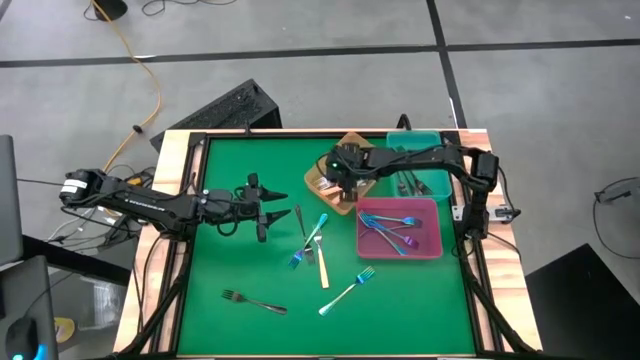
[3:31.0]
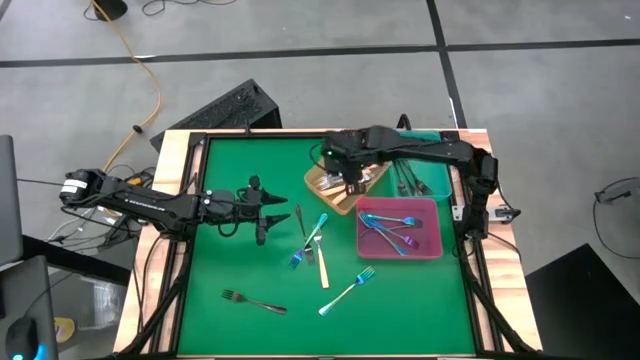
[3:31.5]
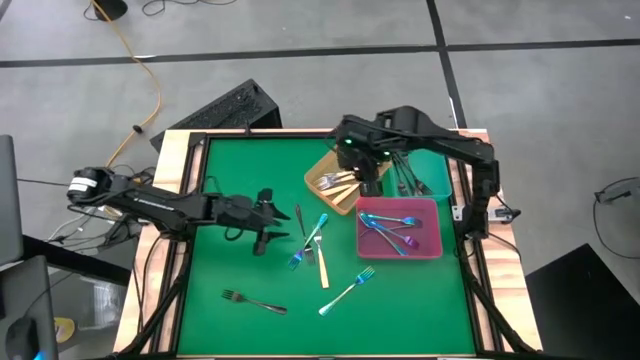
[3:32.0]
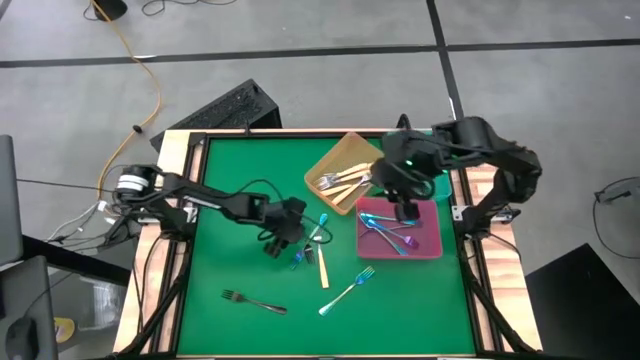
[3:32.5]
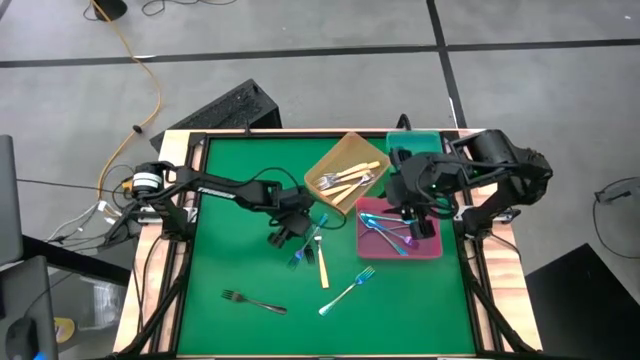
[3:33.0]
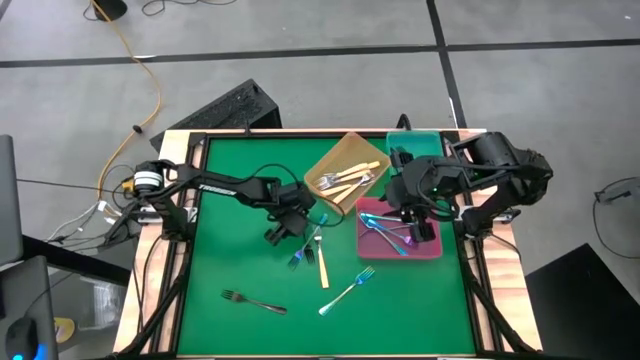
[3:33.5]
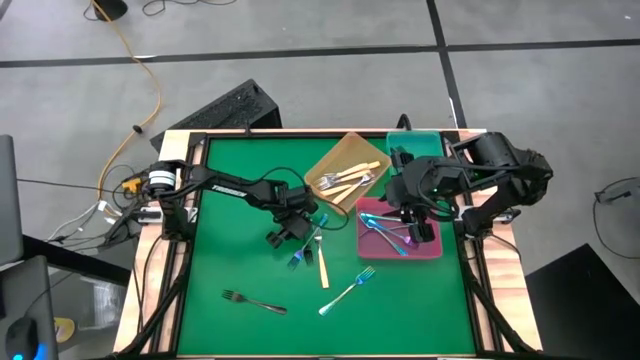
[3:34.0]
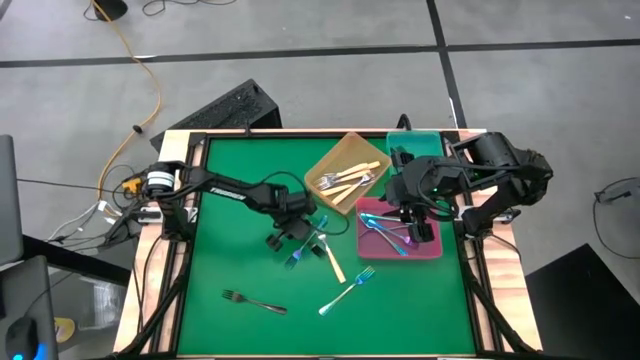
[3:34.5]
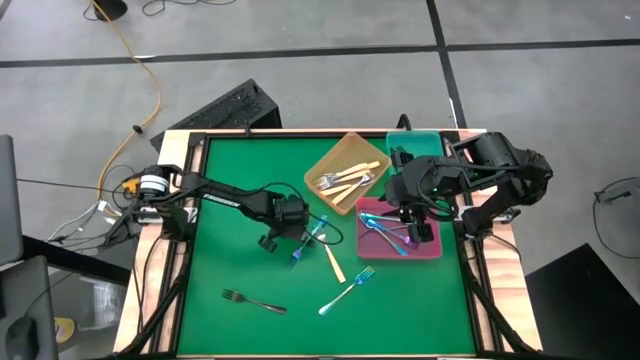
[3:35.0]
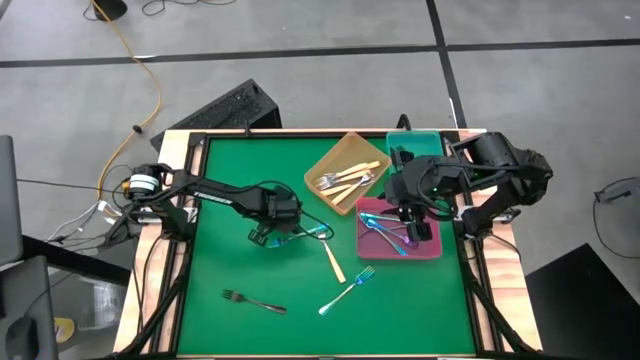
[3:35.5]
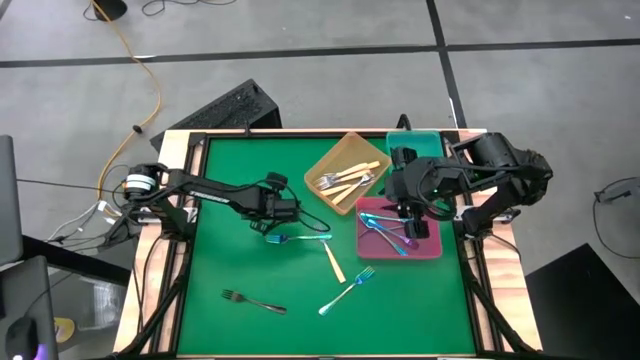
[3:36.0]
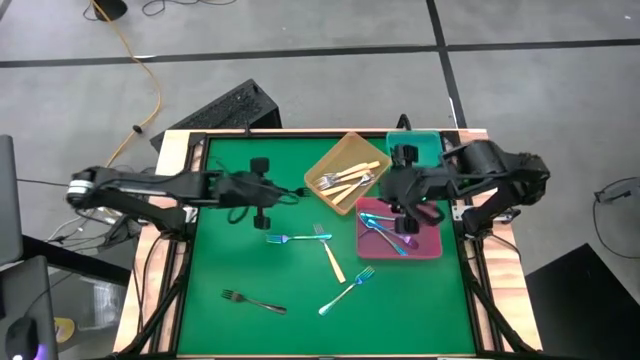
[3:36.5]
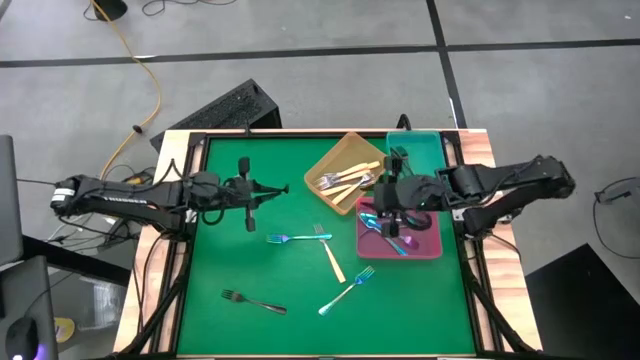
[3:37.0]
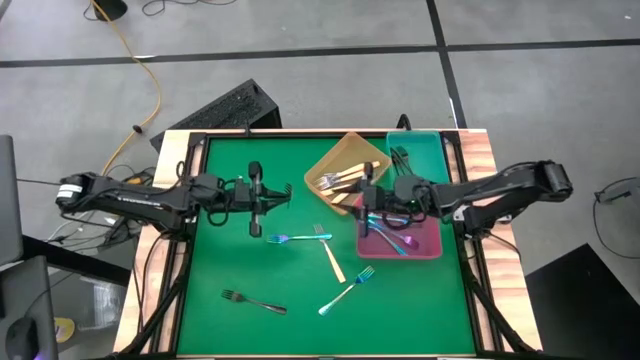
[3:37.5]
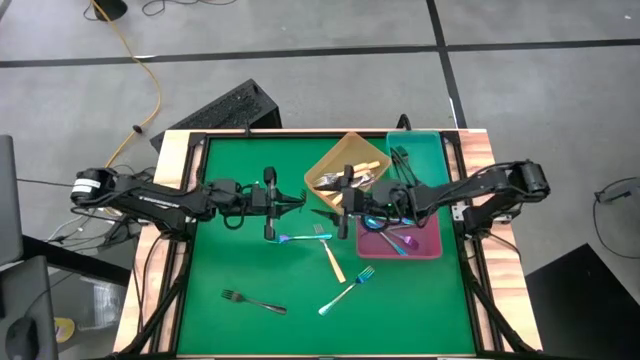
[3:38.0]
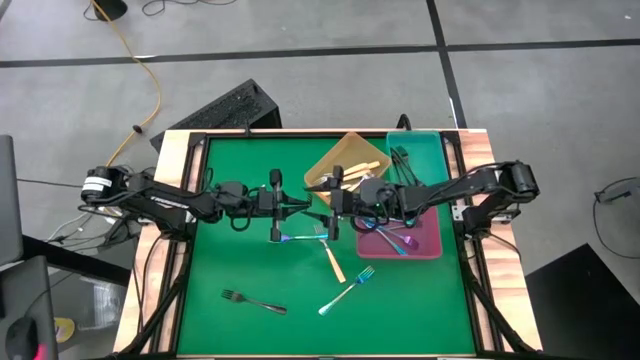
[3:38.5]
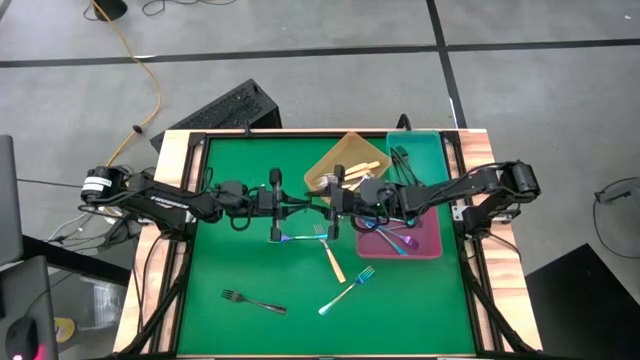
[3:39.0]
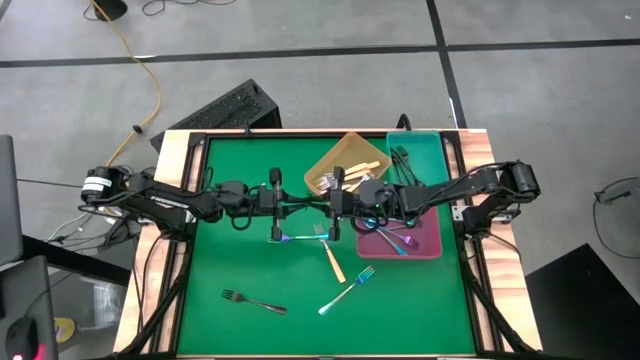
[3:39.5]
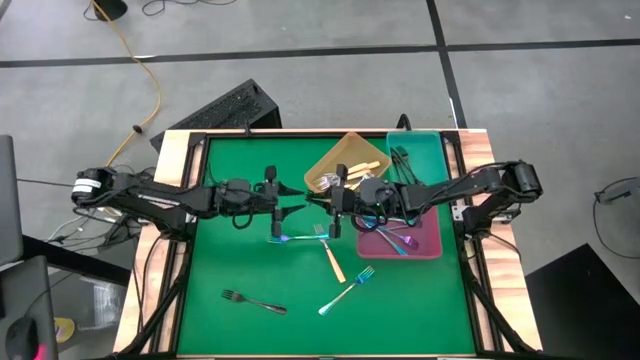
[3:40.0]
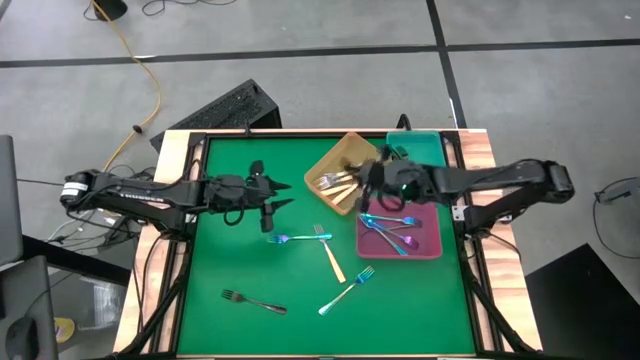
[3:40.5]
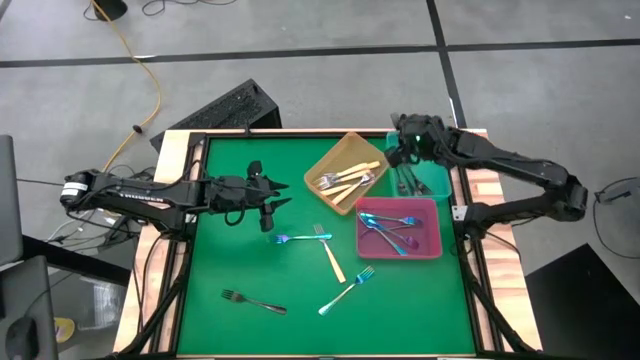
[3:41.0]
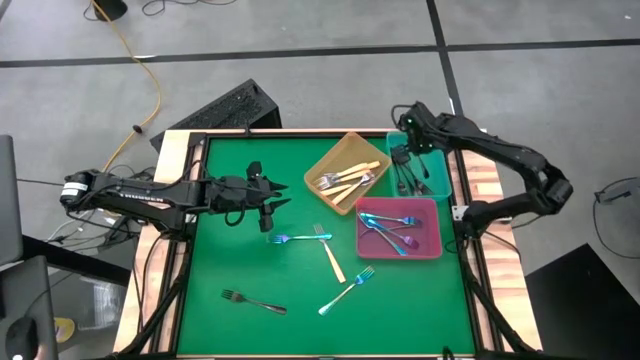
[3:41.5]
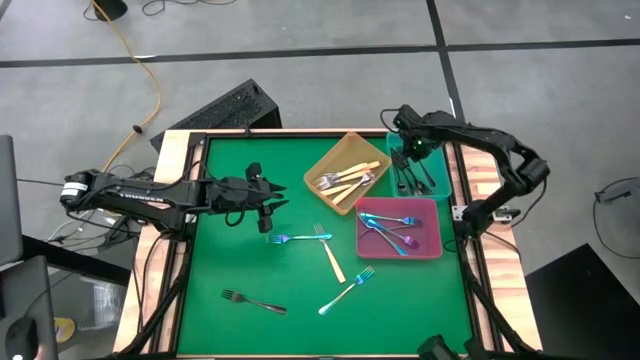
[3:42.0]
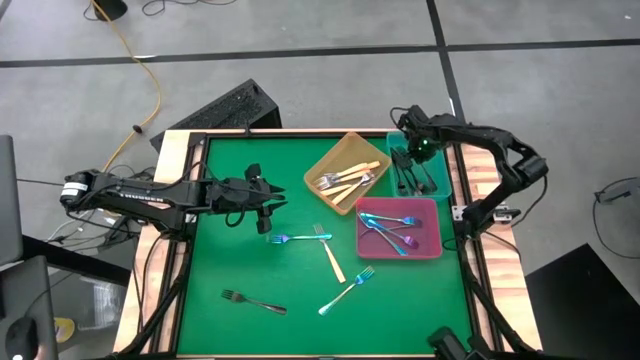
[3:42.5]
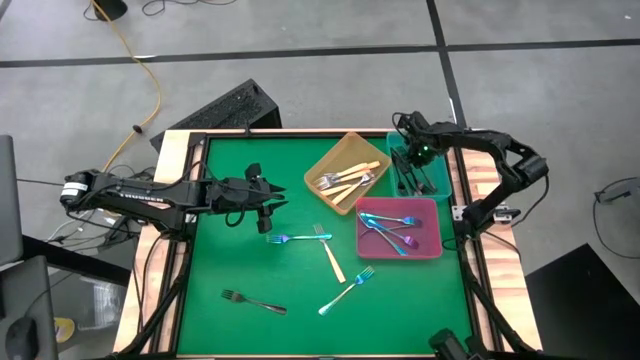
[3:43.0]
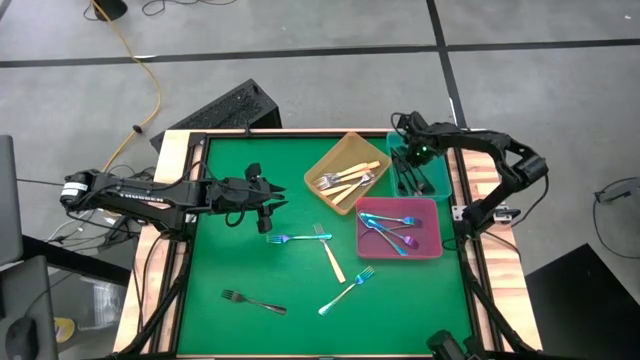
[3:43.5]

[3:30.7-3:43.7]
Task: Sort silverware by color (type)
Put the black fork into the blue bin

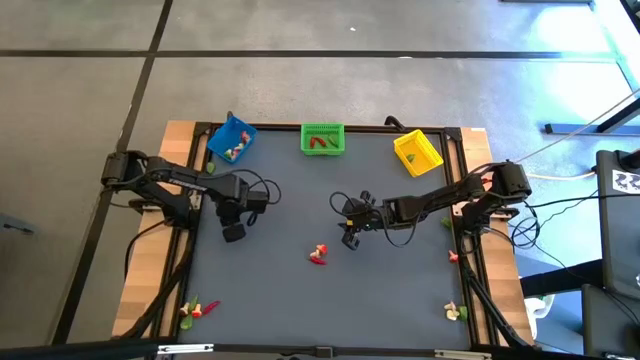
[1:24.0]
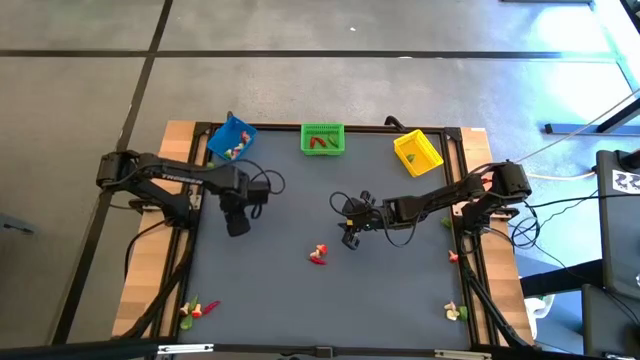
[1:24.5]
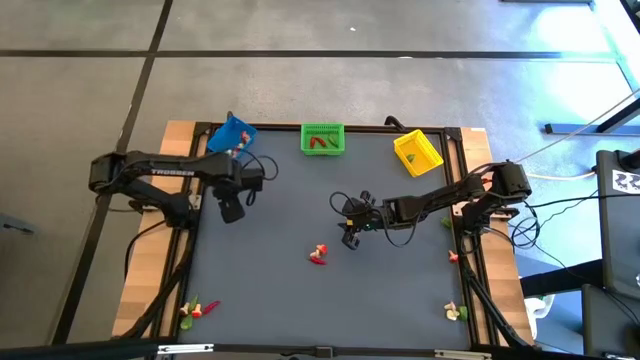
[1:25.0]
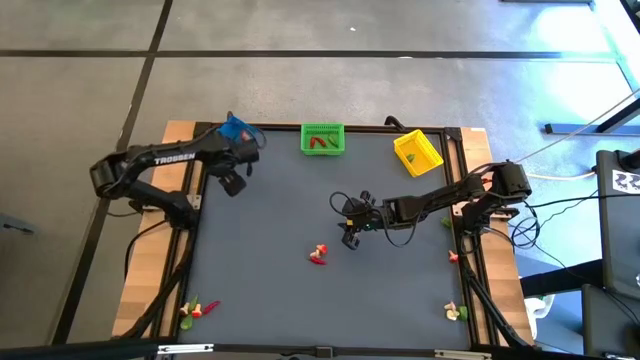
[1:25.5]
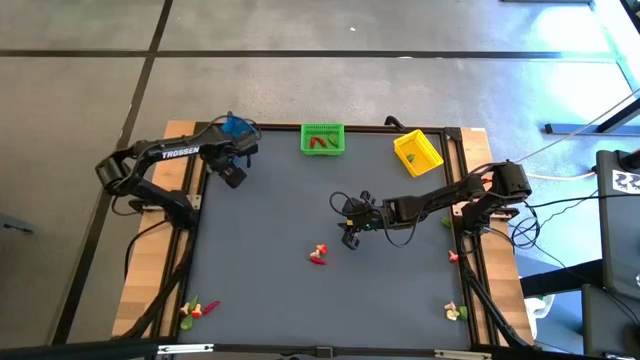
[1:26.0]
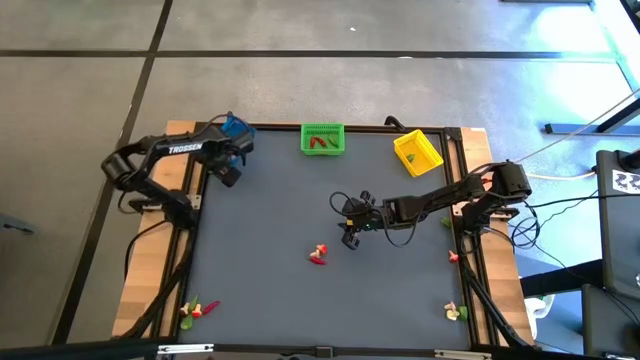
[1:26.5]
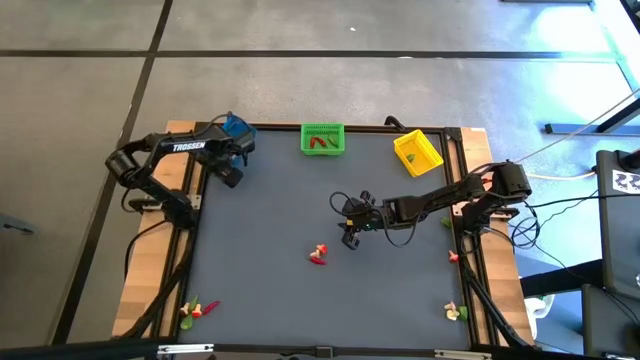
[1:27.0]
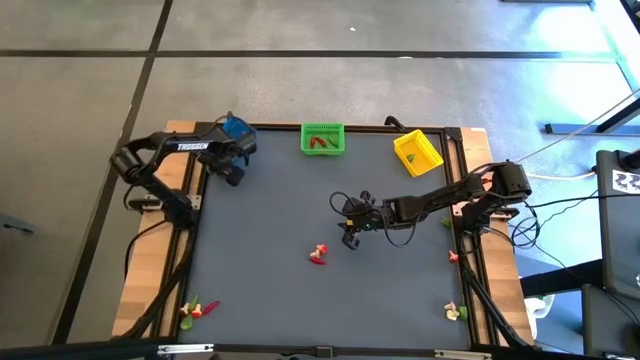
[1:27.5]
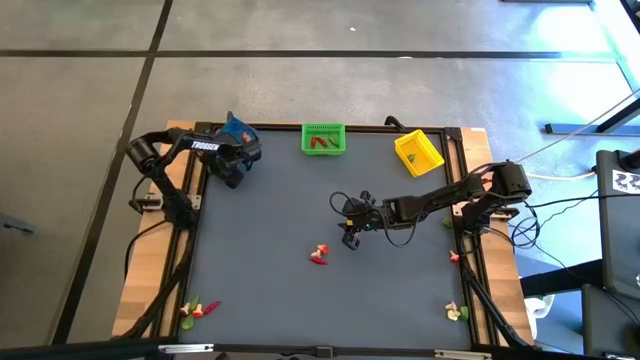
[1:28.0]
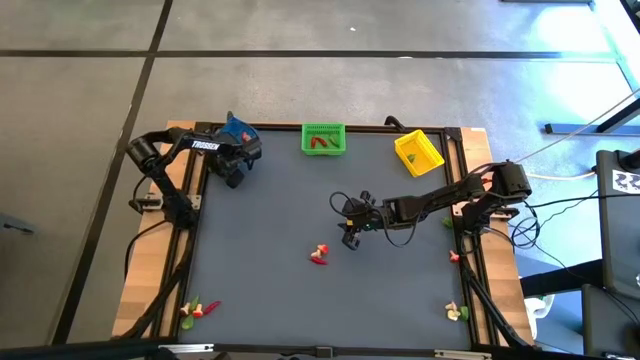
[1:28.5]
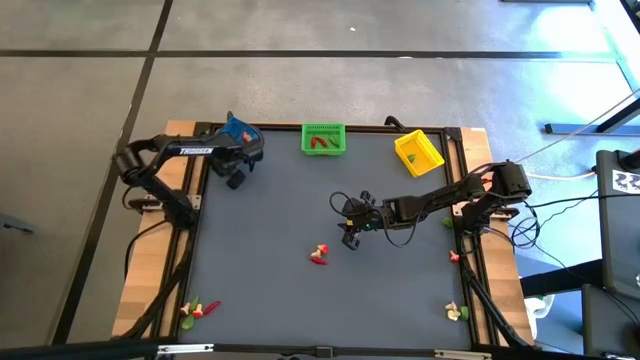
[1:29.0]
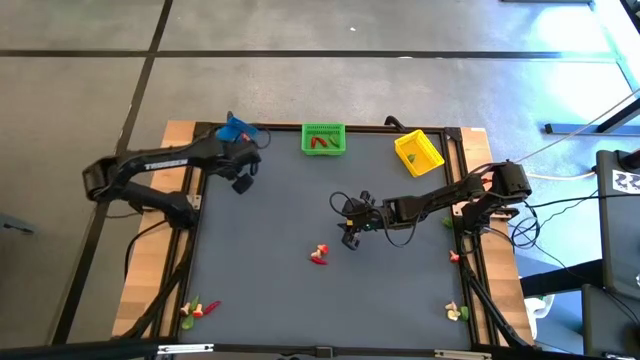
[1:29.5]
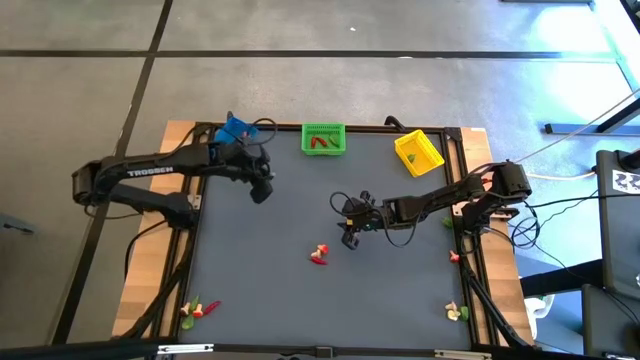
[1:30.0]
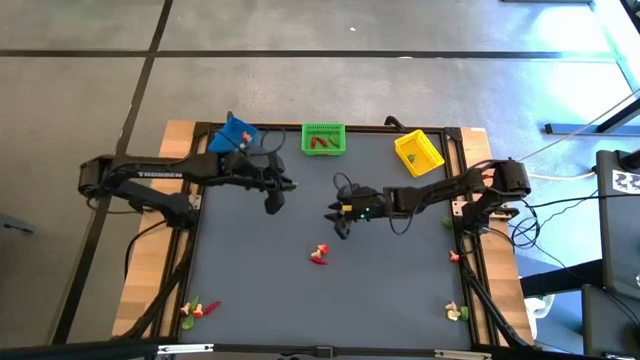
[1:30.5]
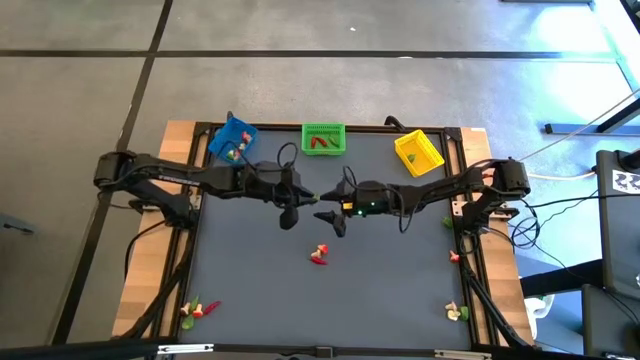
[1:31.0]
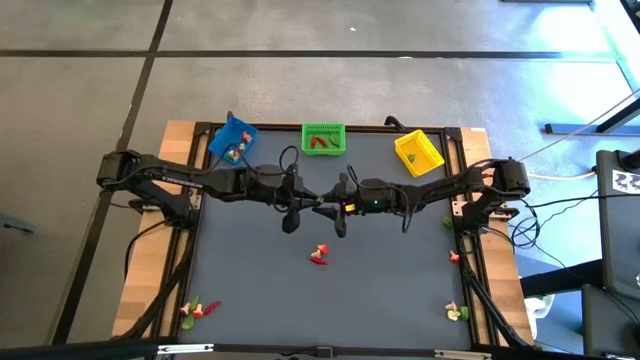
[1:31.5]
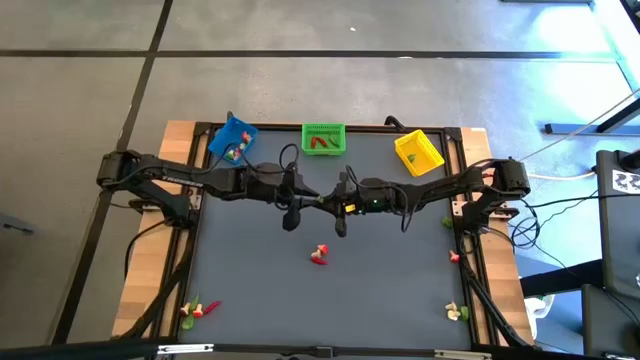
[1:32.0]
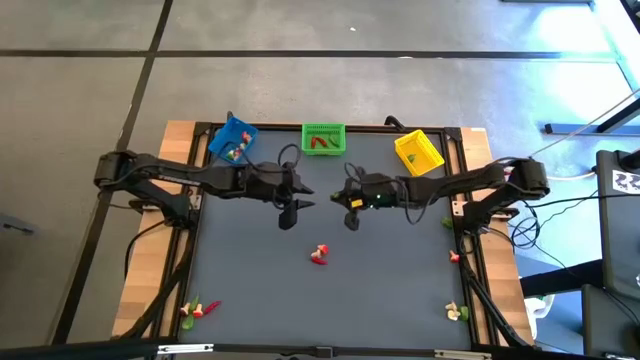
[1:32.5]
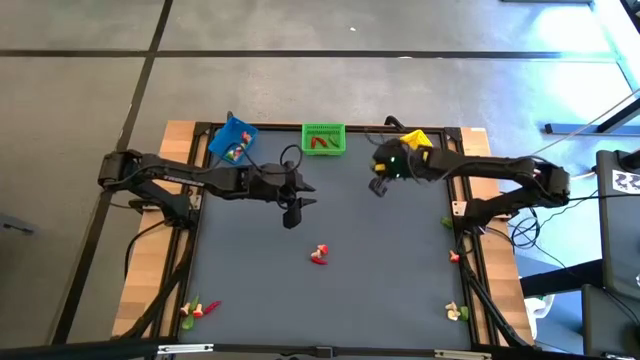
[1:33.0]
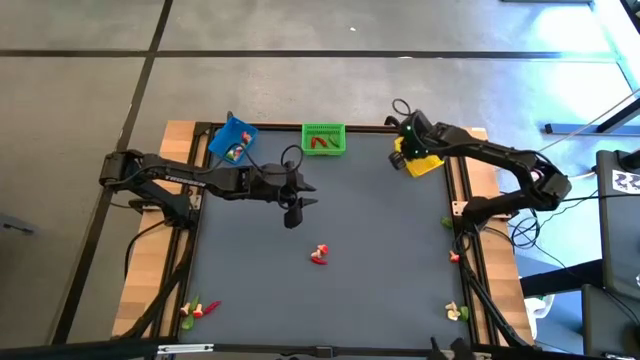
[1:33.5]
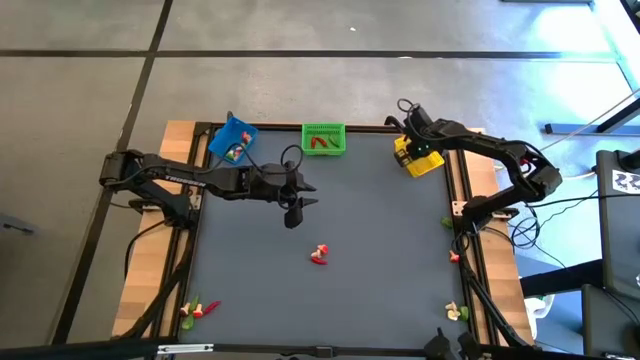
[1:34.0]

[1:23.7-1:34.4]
Task: Sort produce into baskets
Put the green chili pepper into the yellow bin
